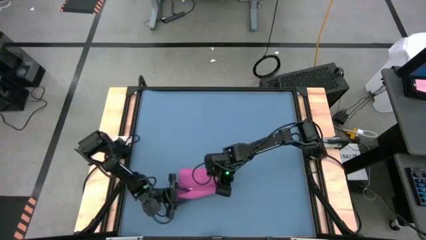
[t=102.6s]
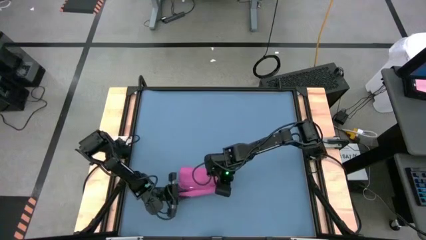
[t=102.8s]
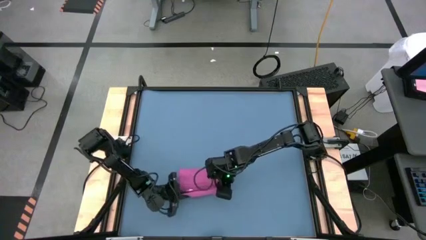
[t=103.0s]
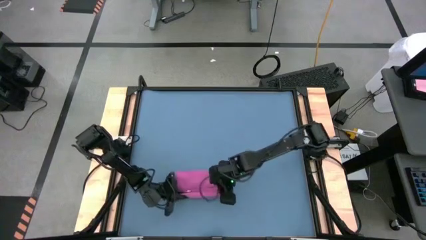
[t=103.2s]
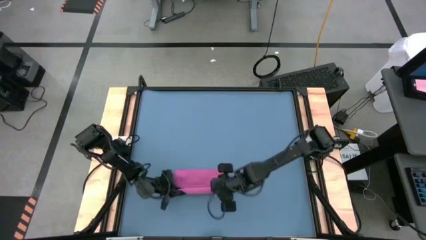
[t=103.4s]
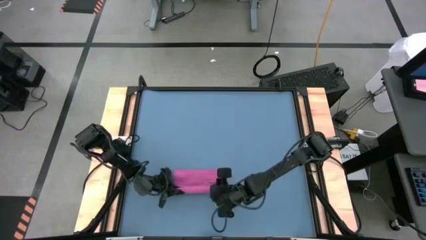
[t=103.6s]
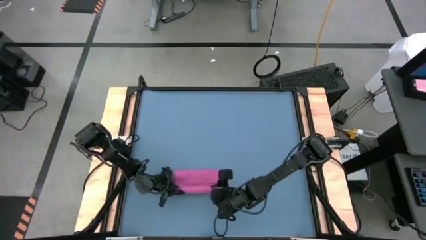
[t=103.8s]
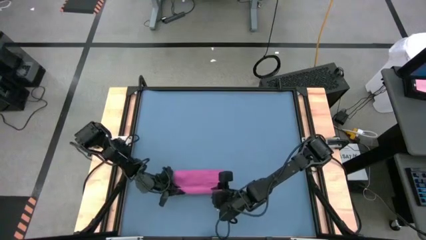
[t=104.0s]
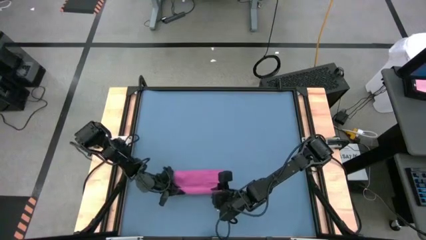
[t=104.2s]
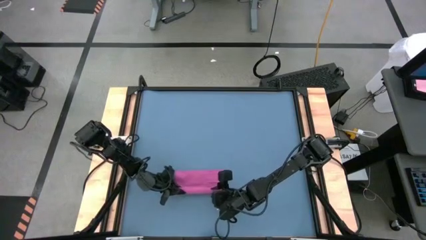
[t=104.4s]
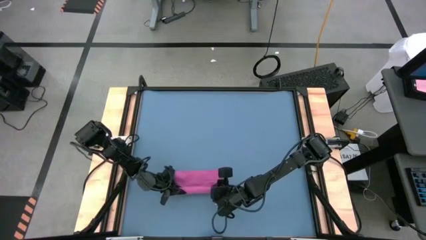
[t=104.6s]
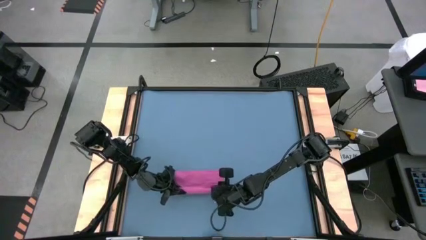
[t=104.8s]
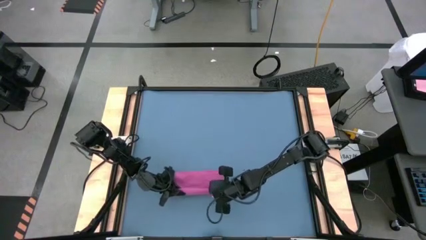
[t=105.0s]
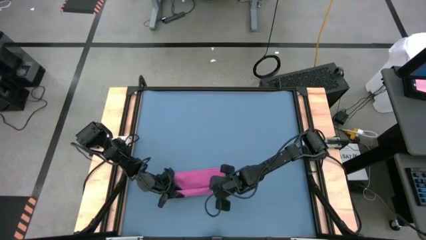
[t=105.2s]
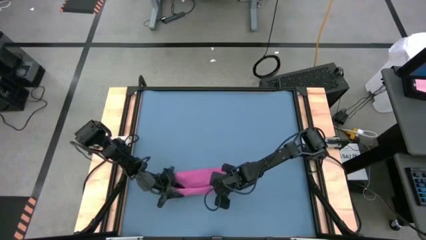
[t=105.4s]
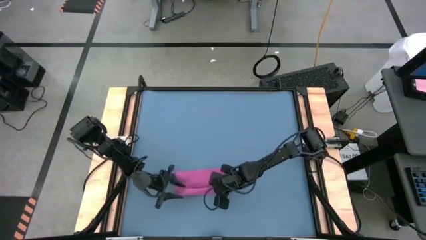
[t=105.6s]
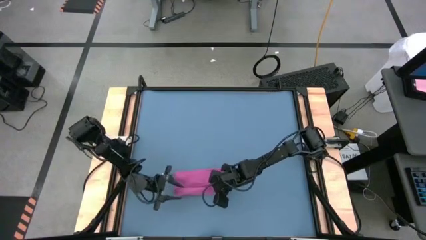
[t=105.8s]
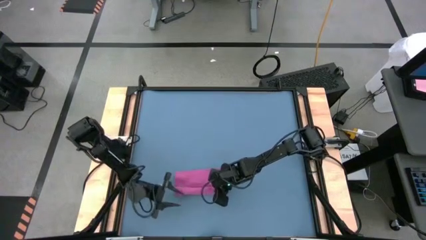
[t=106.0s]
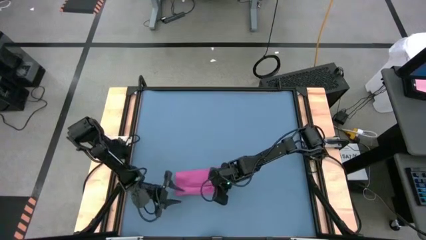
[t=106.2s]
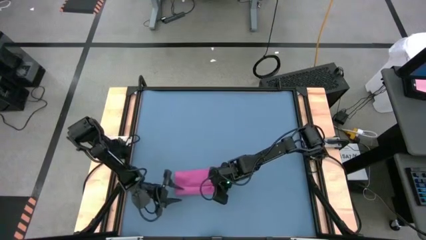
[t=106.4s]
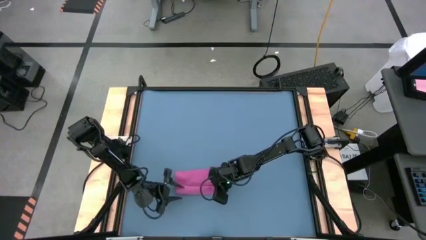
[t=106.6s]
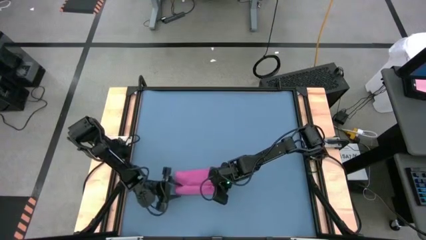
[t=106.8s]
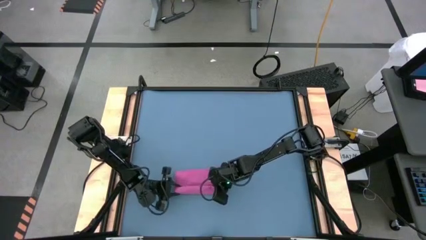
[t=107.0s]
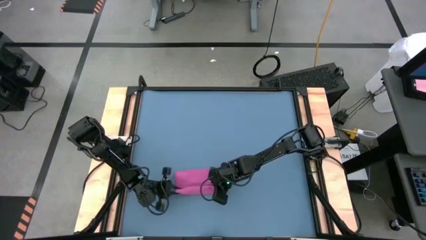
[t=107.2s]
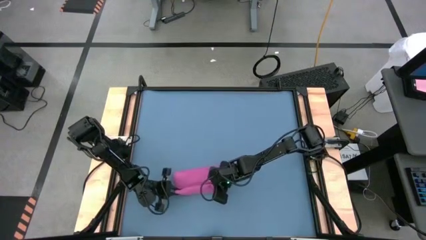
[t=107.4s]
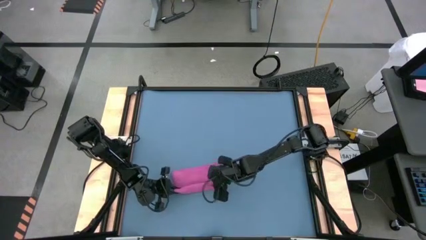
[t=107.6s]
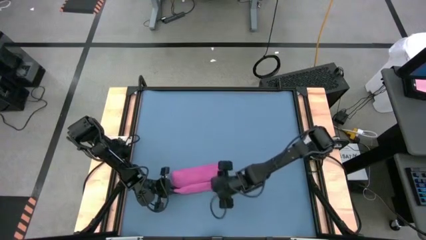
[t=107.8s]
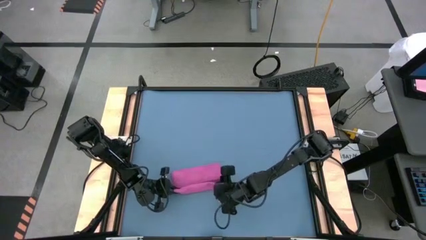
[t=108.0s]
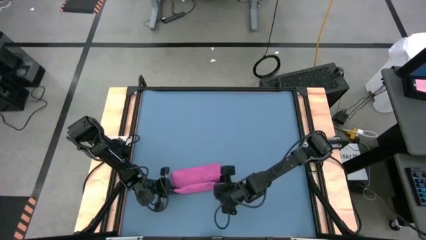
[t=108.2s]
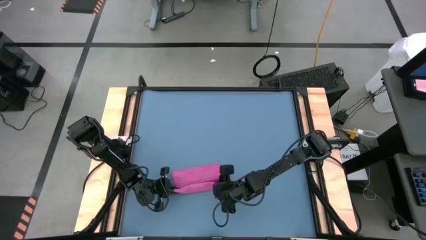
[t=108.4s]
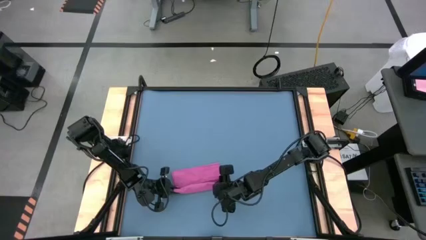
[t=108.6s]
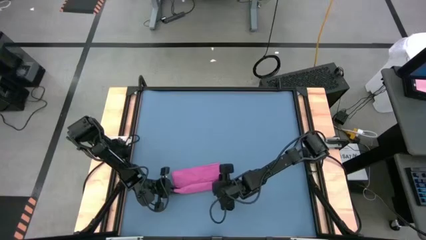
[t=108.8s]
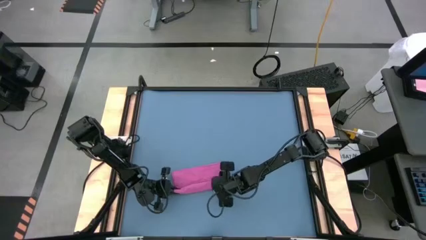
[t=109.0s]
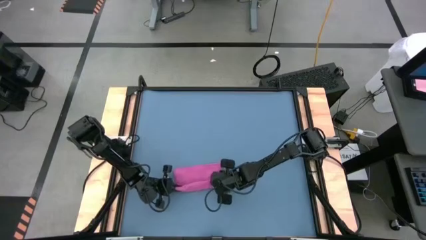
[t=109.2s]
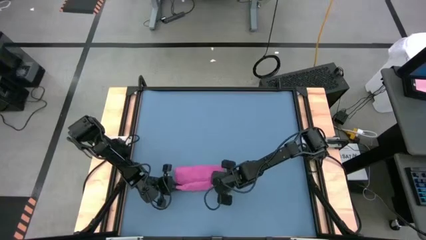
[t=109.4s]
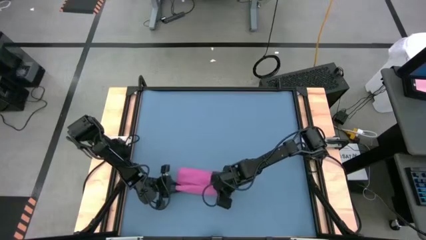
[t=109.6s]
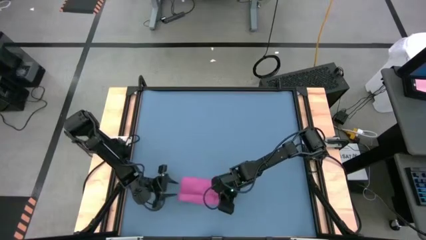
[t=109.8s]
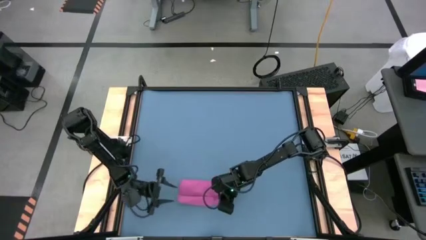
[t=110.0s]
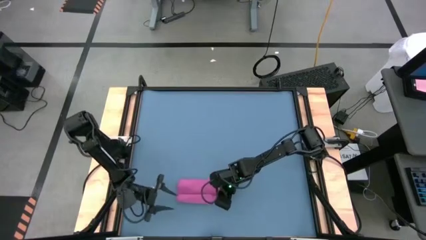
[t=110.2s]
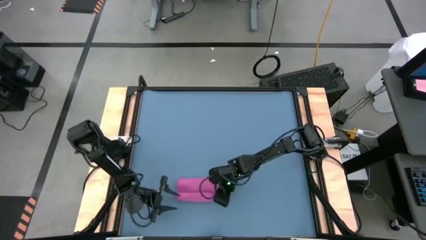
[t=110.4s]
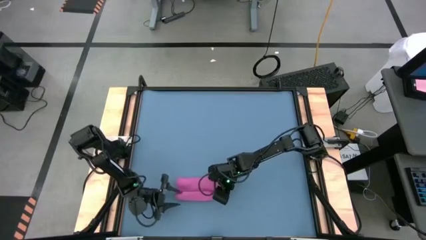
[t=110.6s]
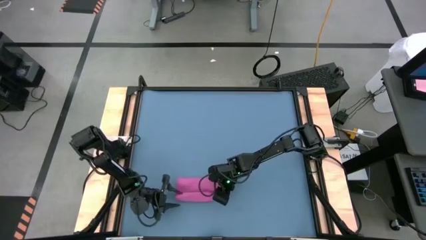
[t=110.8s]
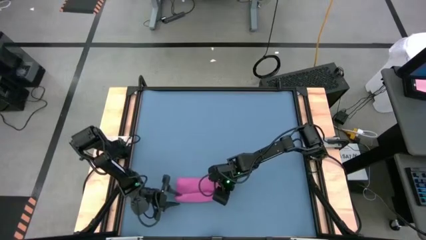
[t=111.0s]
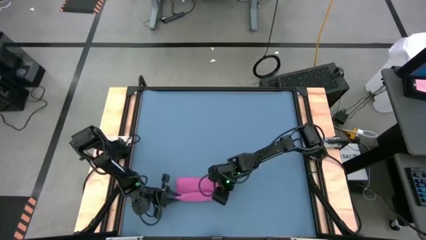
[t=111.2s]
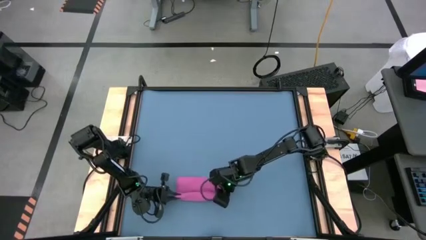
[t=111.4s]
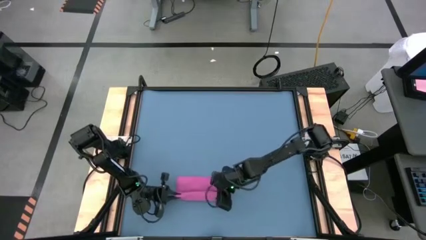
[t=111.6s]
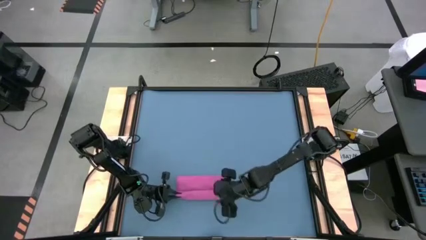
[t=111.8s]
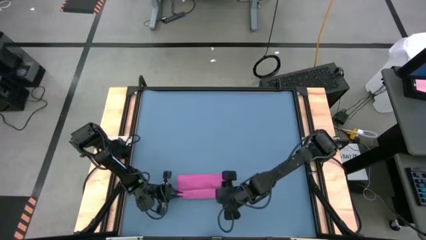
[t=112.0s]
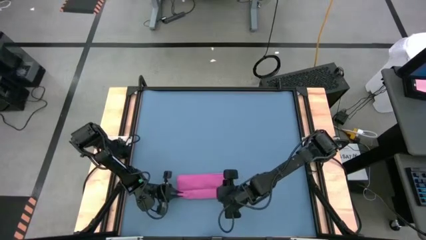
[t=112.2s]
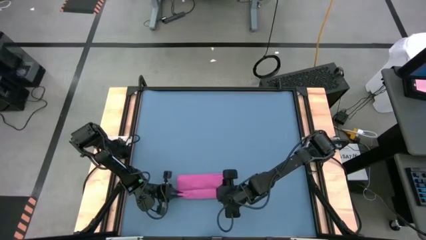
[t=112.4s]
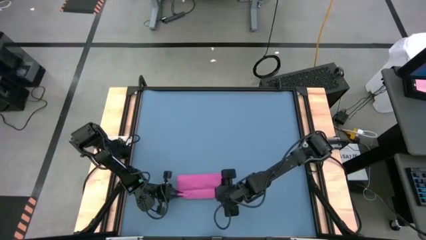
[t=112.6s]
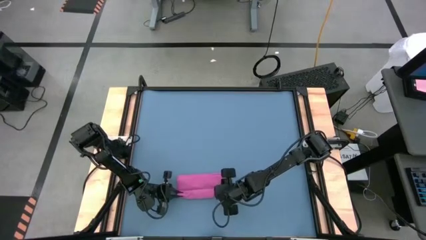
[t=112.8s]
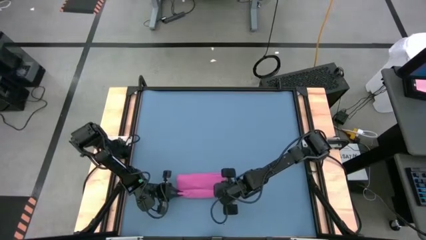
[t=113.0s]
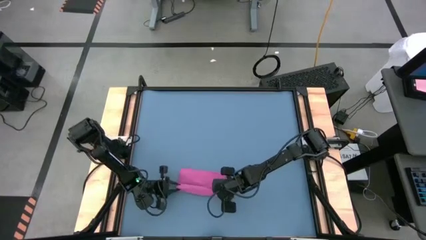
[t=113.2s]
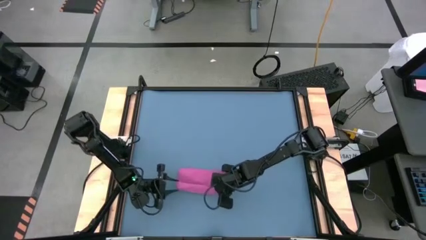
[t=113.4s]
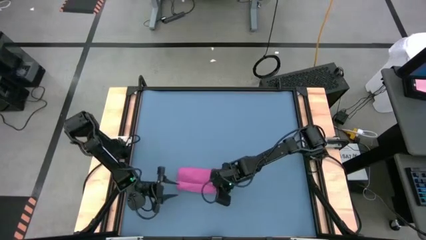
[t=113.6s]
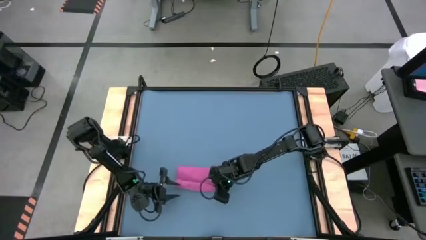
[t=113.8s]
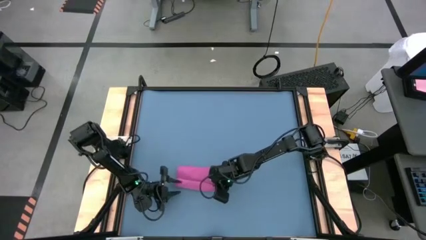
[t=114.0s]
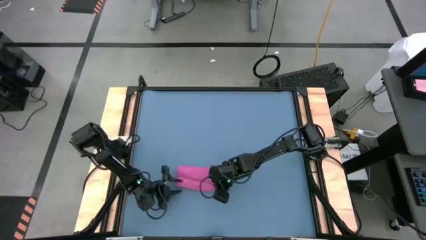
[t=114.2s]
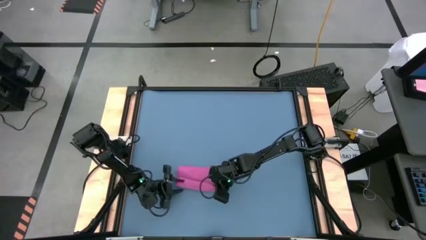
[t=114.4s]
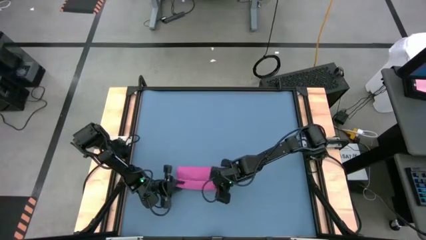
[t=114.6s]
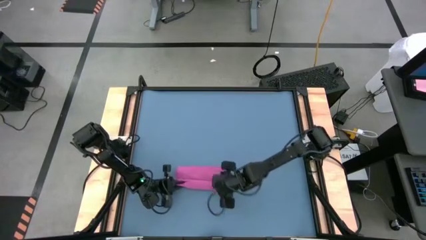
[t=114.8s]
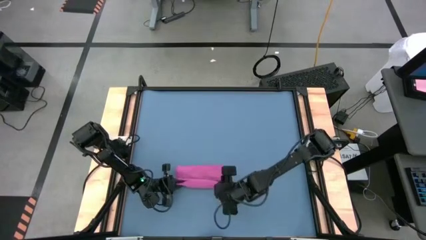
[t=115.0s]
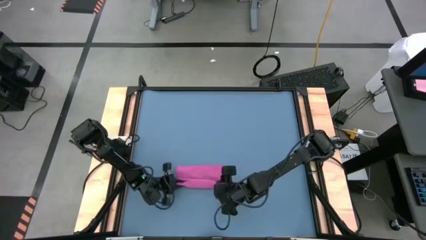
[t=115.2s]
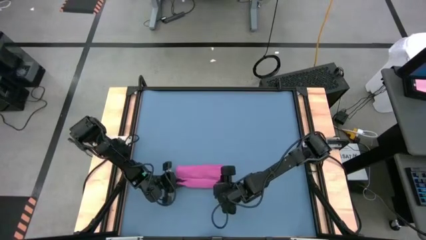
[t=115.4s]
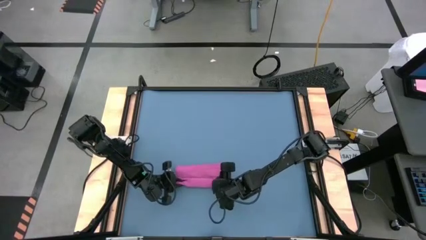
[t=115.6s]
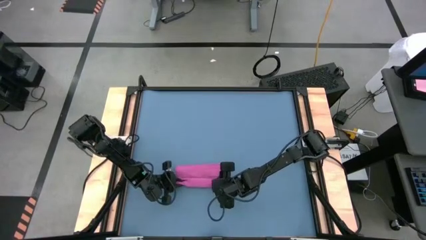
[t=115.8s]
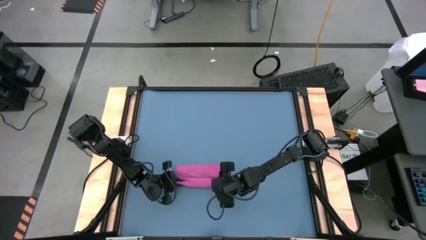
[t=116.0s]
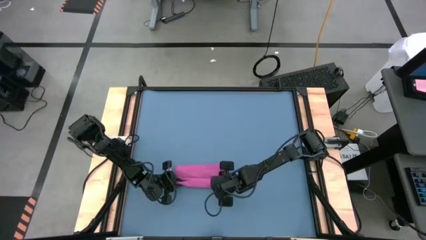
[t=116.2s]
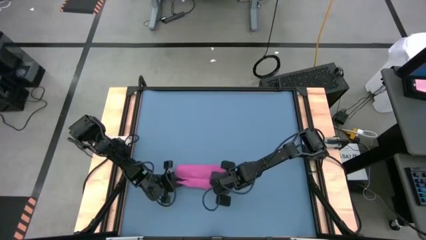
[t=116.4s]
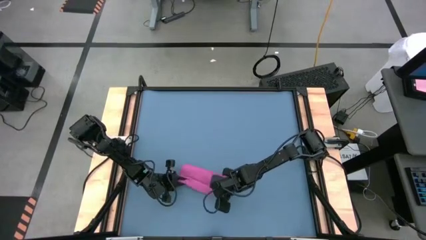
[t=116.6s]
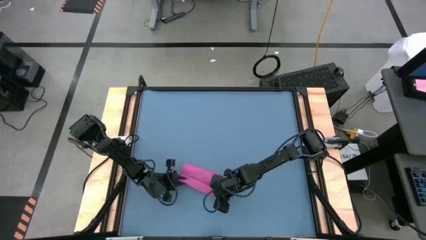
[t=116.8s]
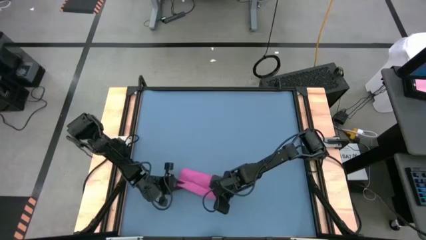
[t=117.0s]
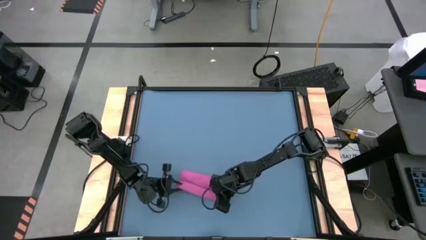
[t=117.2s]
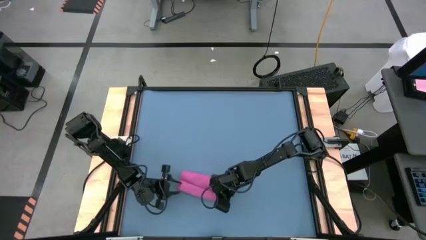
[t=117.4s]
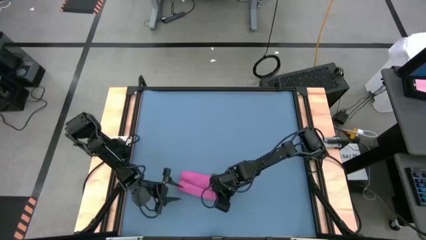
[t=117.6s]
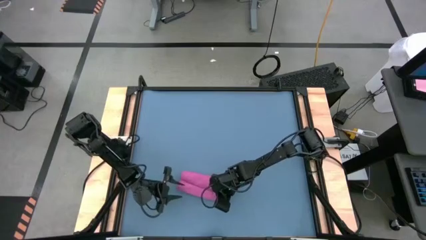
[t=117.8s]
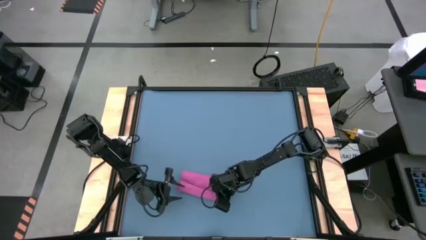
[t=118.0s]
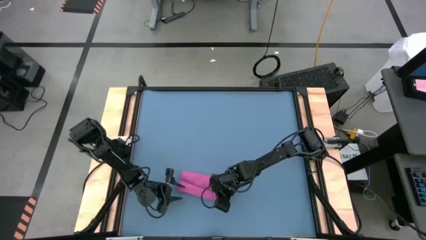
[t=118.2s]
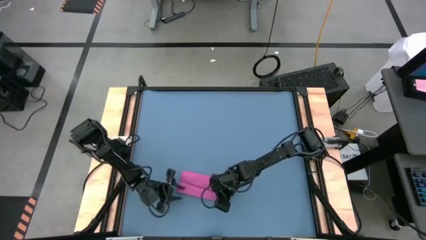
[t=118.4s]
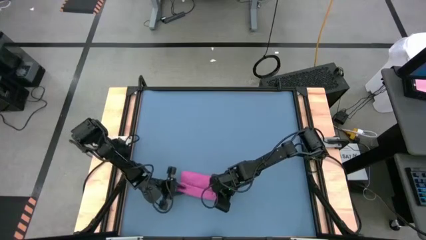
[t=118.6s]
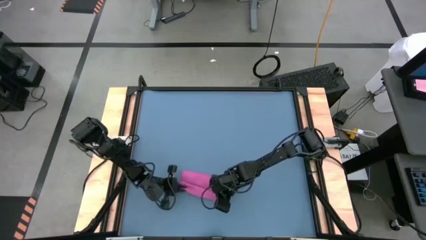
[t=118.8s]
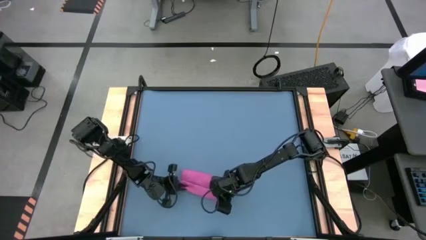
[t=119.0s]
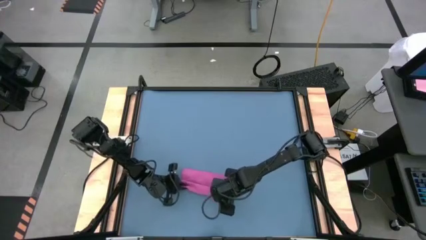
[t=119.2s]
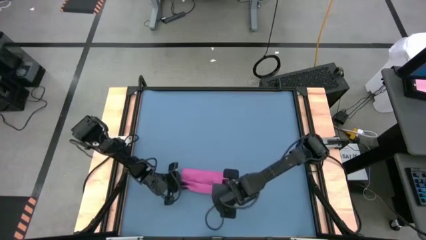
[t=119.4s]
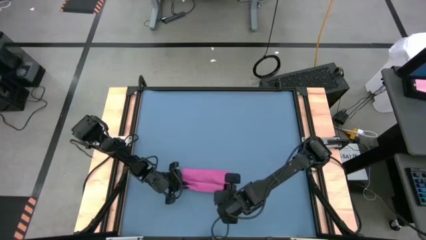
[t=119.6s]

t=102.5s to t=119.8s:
Task: Roll towel
Roll the light red towel
